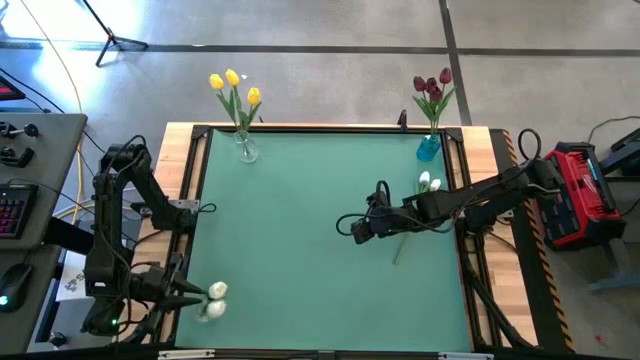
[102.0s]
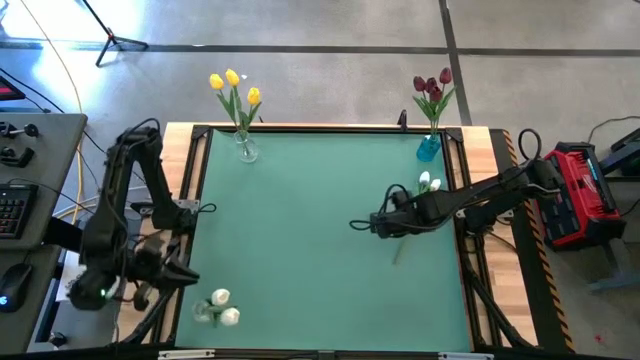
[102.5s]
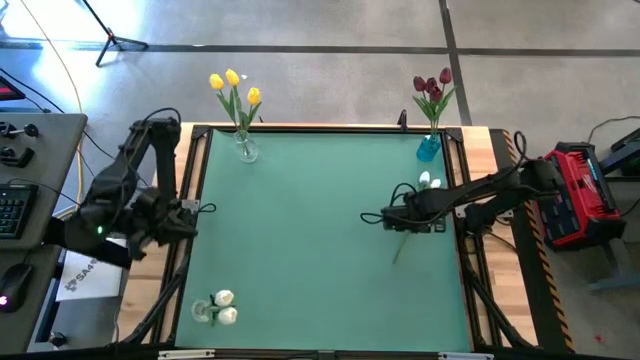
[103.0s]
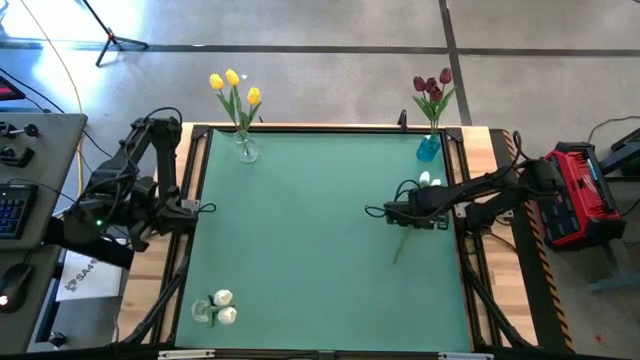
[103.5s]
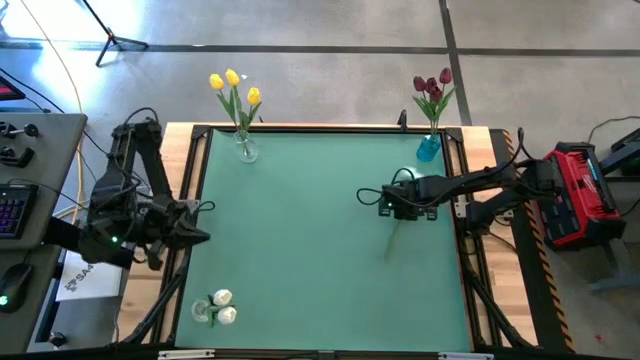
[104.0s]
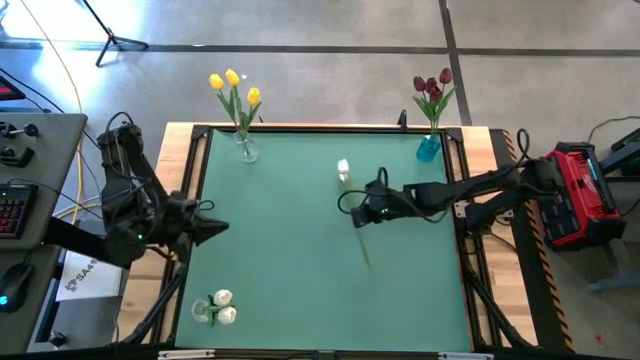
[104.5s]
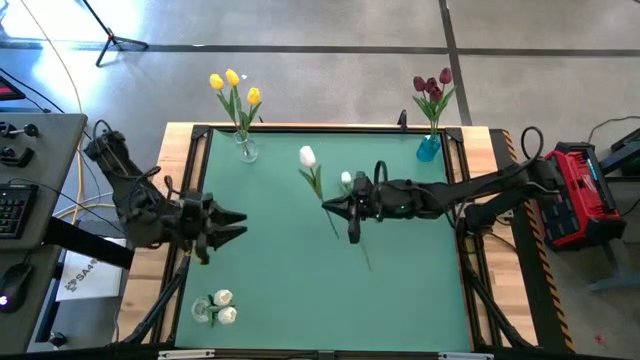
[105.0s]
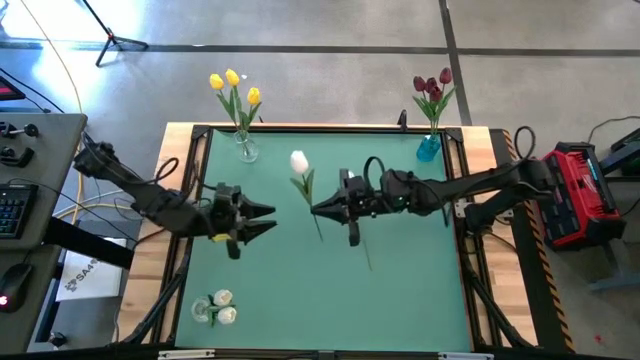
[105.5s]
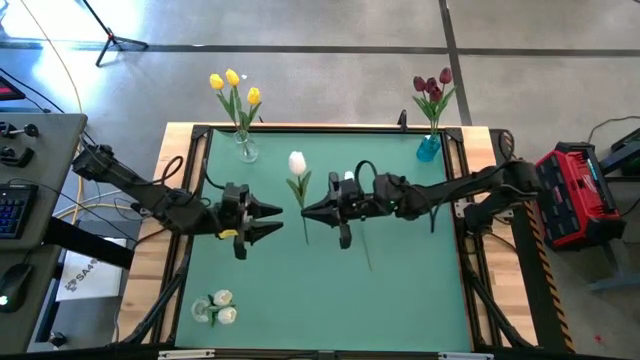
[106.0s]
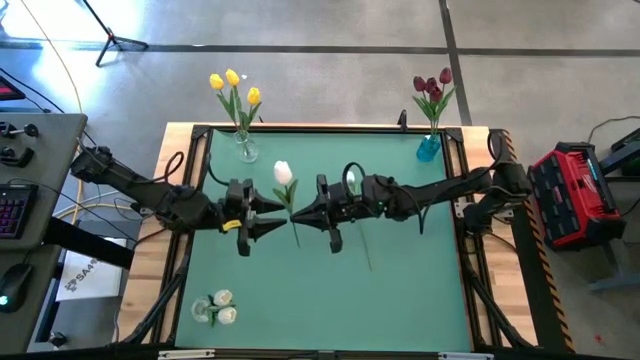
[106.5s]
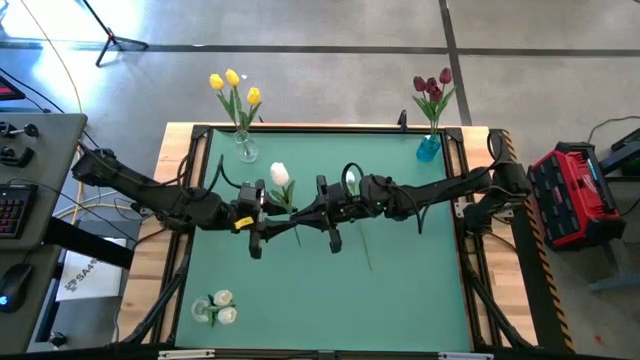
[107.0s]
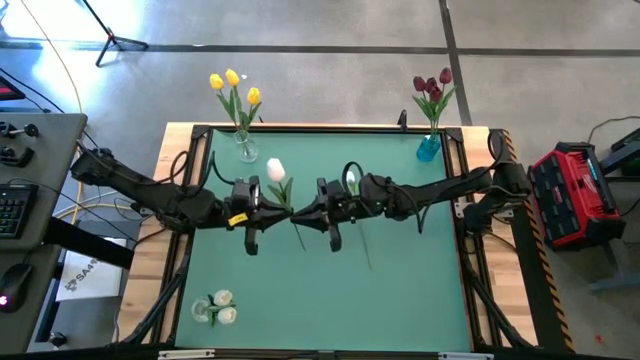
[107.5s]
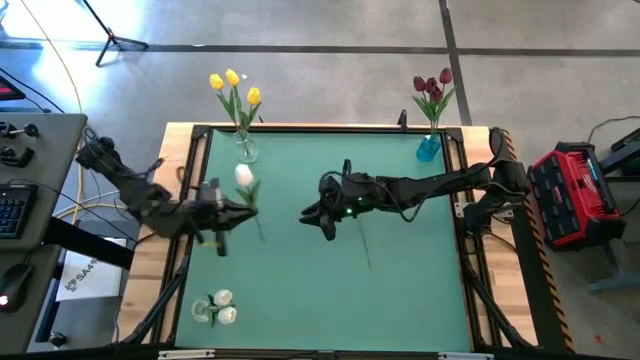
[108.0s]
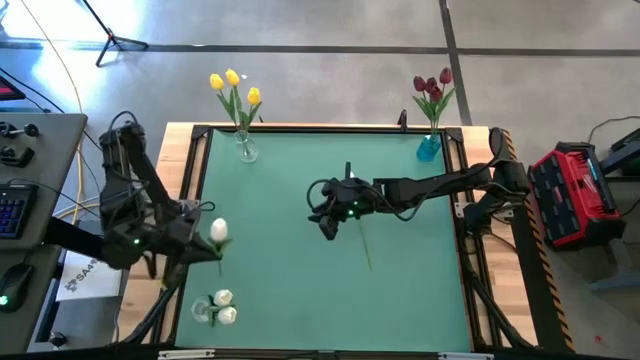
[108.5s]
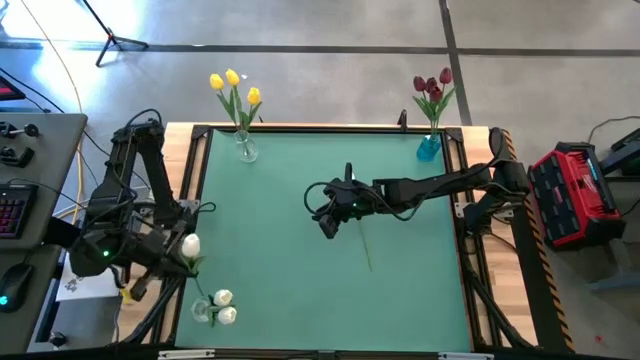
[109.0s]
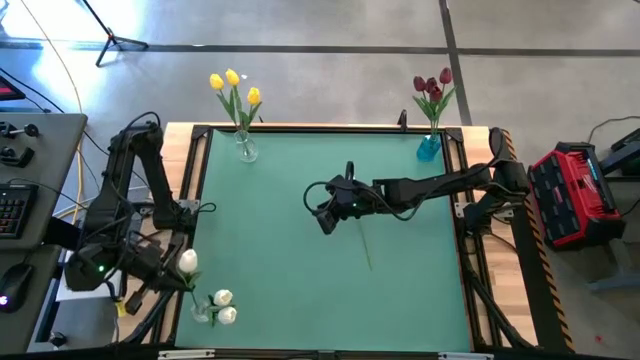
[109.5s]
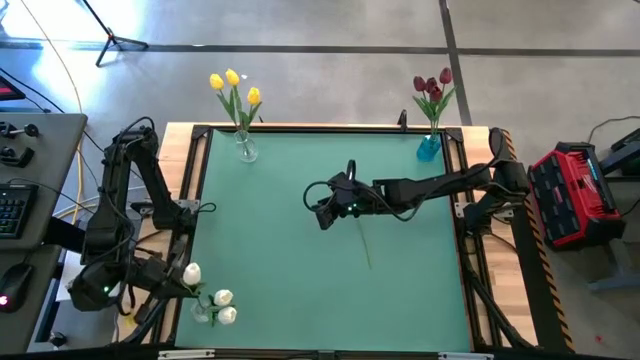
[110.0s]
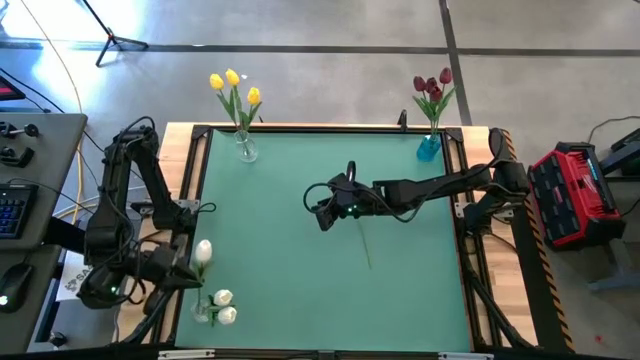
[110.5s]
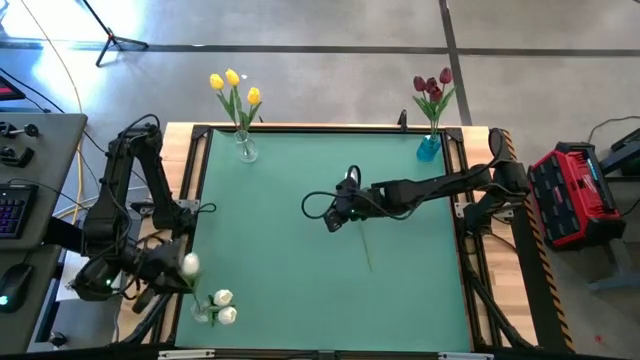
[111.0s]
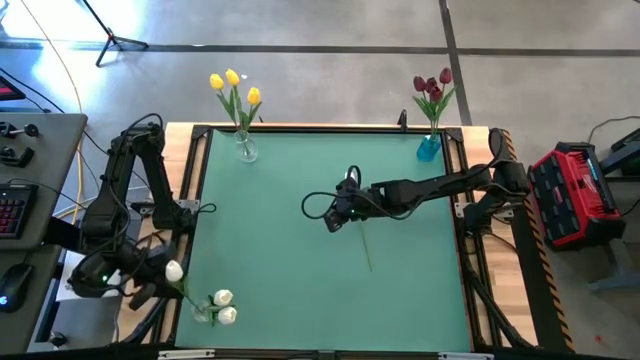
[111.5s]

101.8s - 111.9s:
Task: Sort flowers into vase by color
Put the right white tulip into the bottom transparent vase

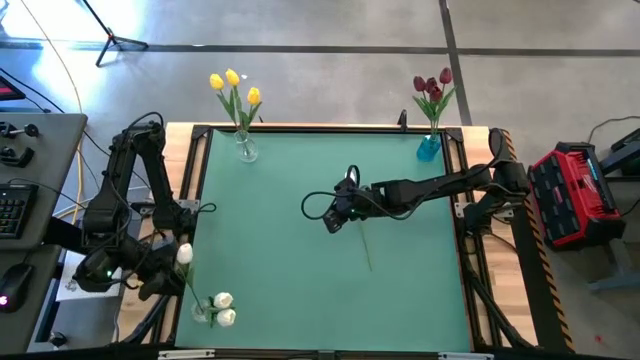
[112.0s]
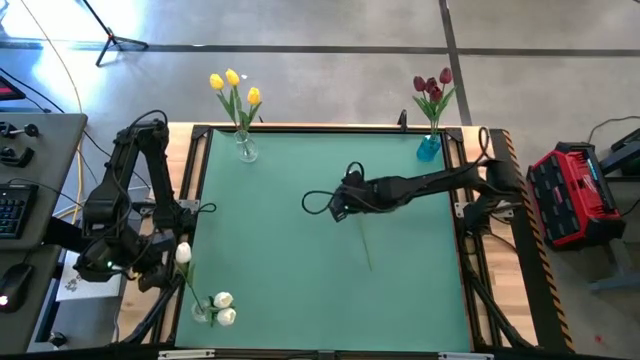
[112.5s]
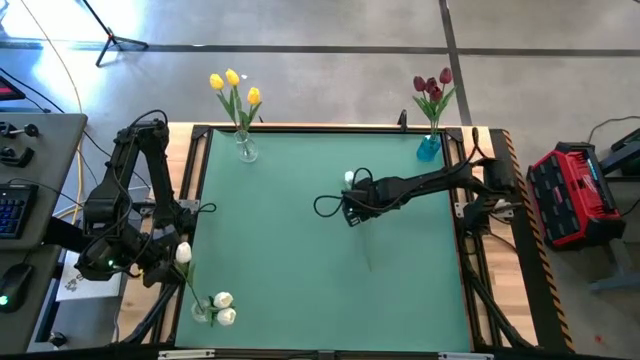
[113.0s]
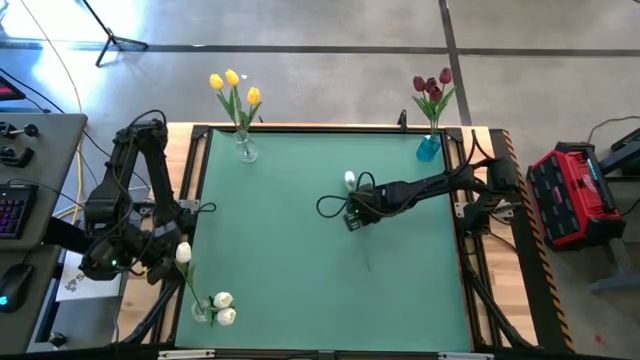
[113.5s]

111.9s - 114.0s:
Put the white tulip into the bottom transparent vase

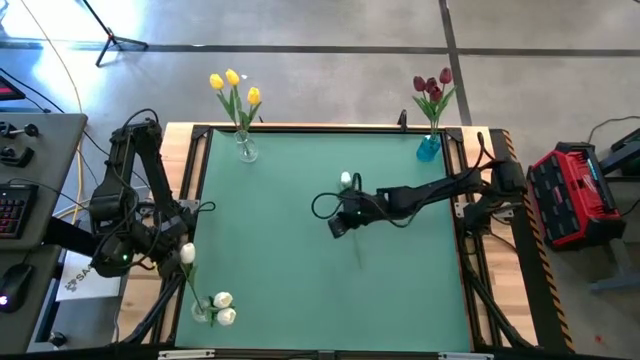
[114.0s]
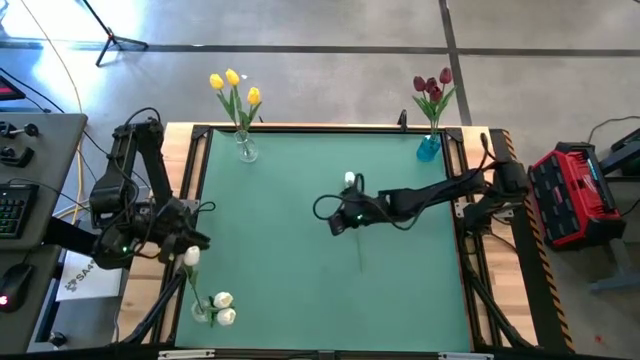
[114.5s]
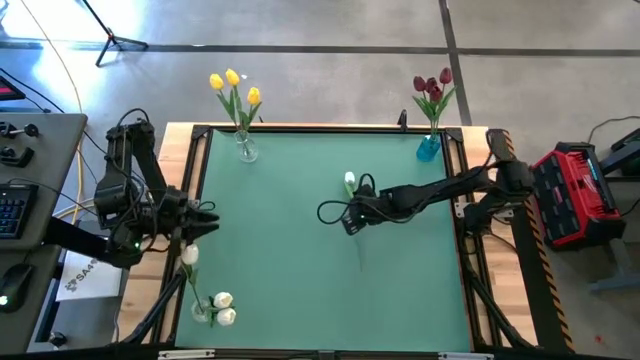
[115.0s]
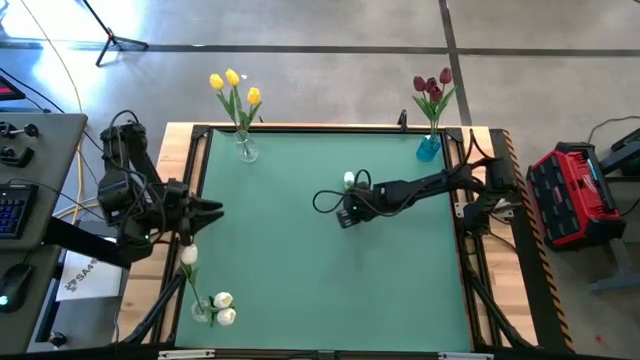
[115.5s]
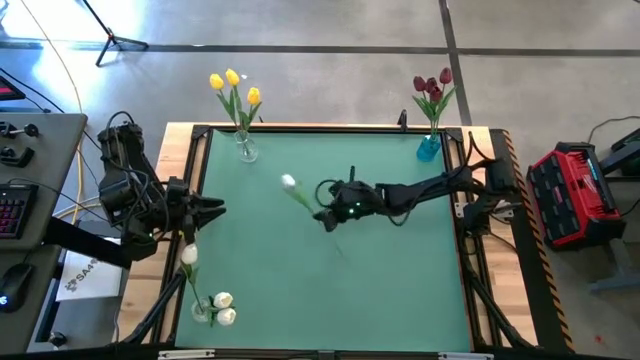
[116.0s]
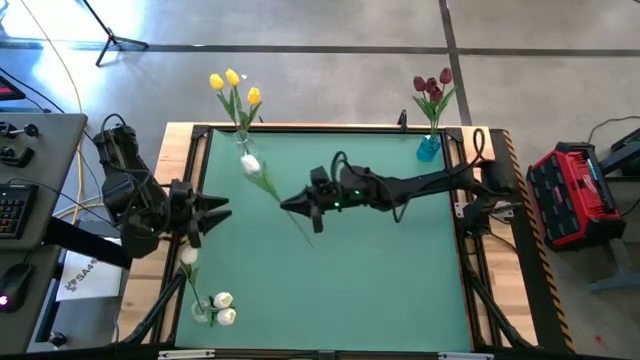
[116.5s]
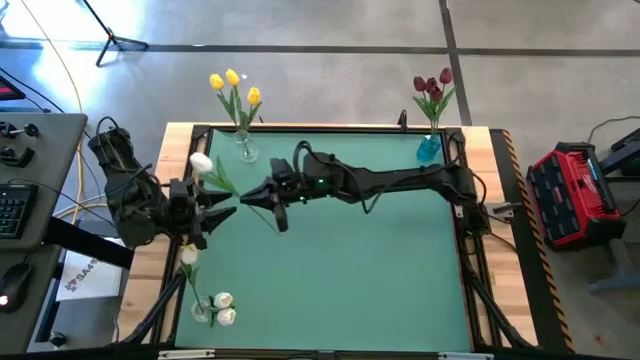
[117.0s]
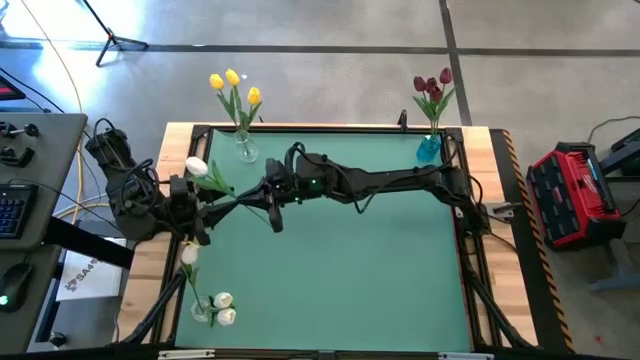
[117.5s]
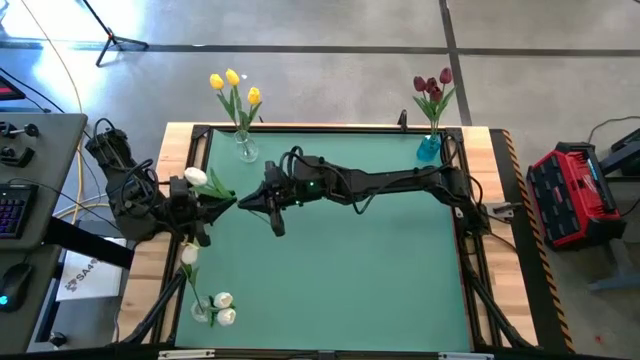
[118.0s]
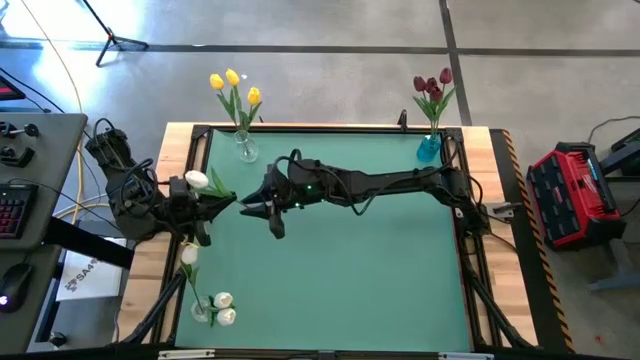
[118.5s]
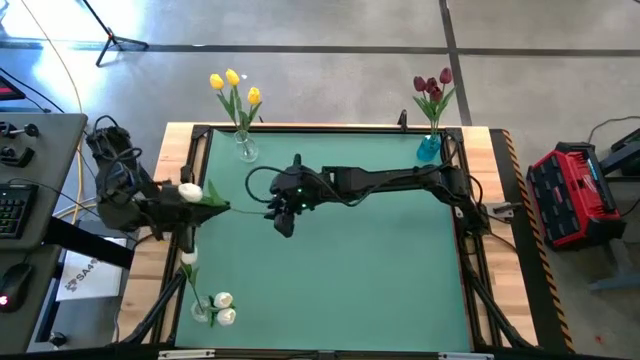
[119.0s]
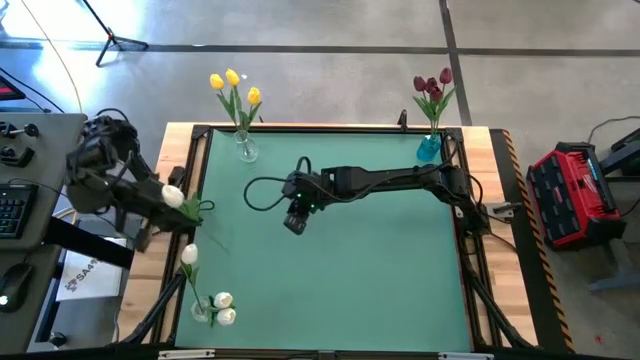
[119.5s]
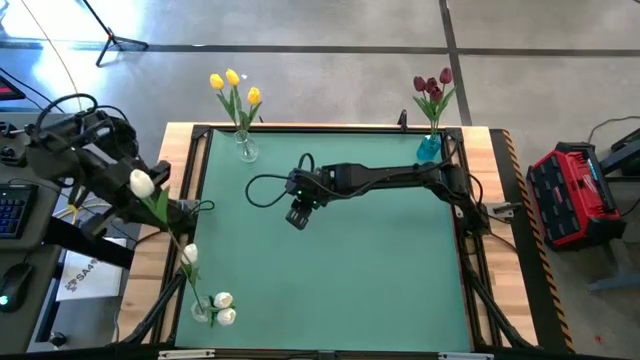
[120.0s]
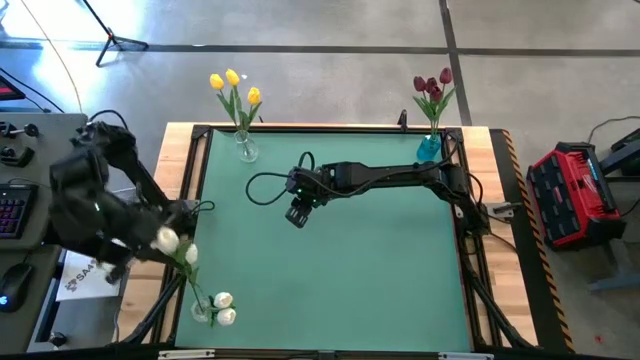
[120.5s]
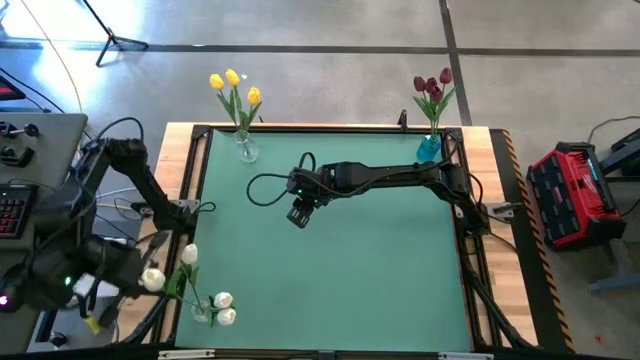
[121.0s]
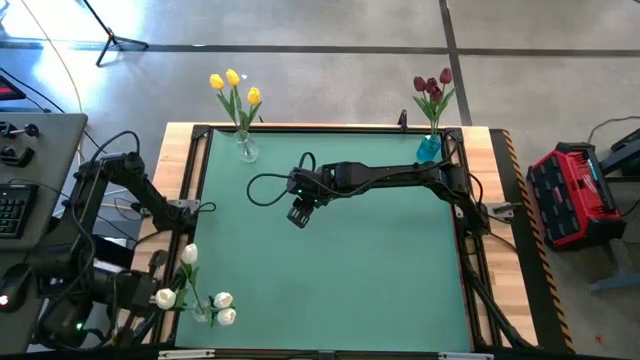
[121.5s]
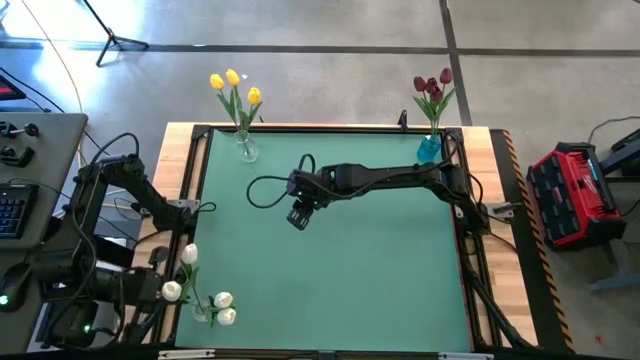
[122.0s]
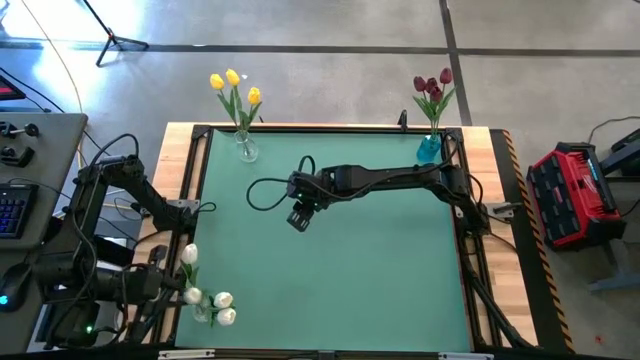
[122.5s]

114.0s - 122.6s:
Put the white tulip into the bottom transparent vase

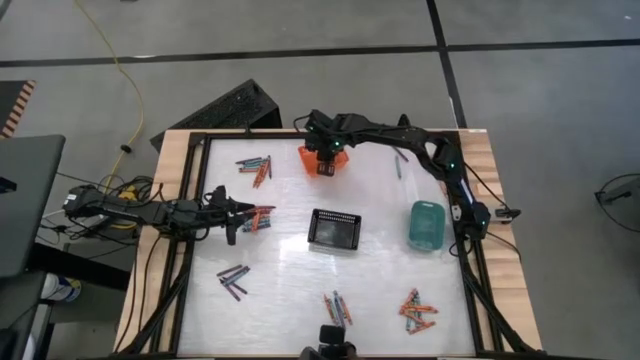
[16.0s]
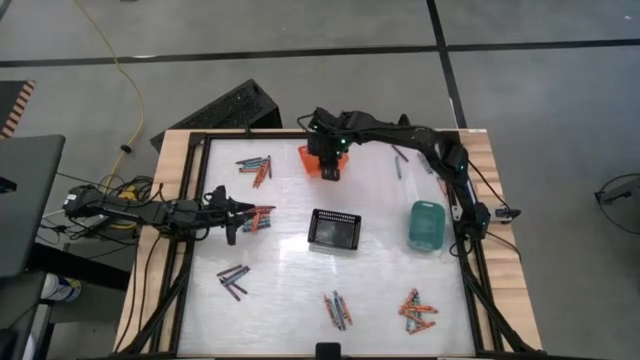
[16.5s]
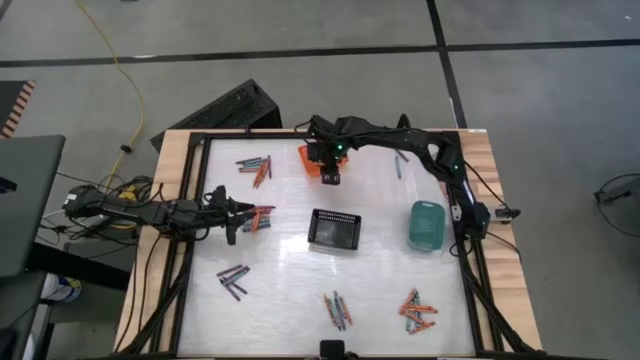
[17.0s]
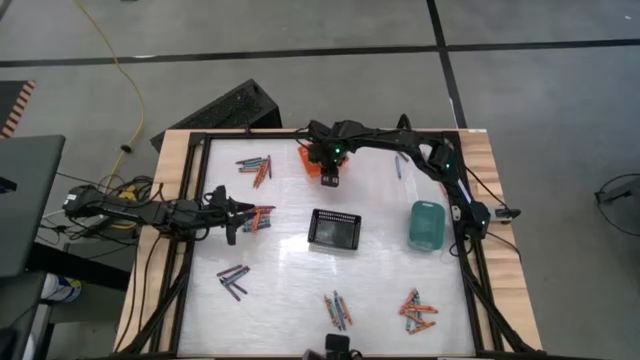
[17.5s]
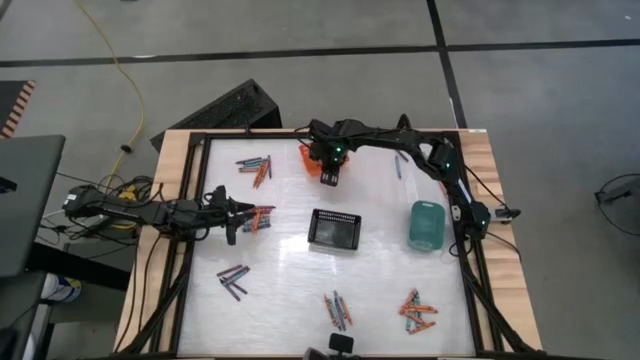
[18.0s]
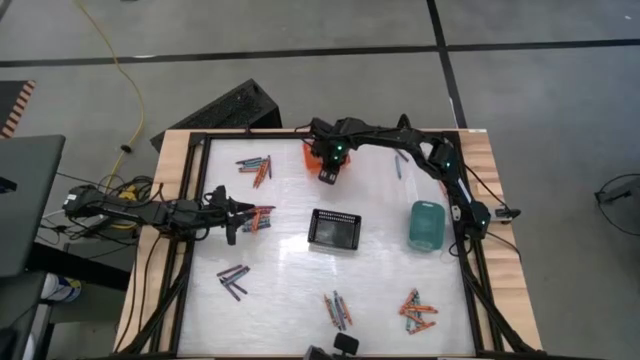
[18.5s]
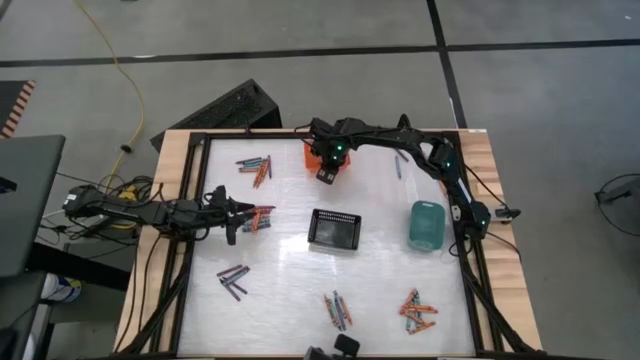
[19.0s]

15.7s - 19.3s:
Task: Sort crayons
Adjust the orange bin
